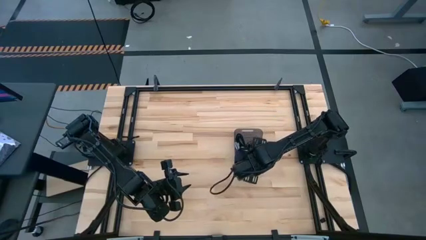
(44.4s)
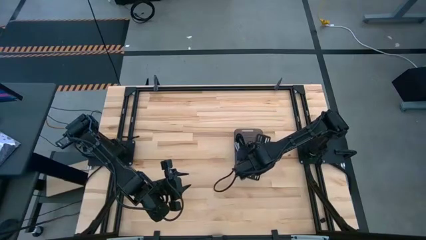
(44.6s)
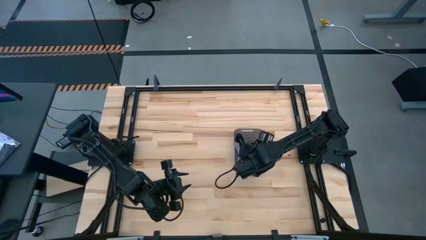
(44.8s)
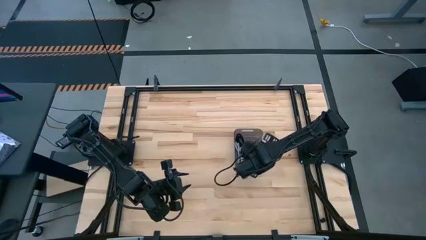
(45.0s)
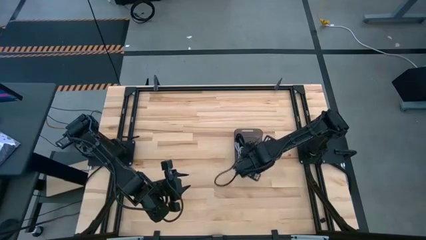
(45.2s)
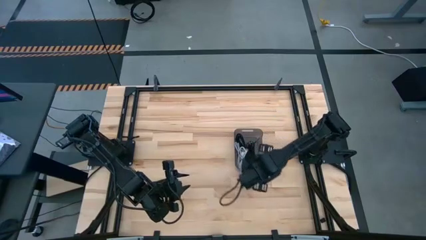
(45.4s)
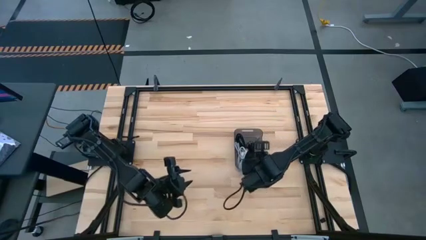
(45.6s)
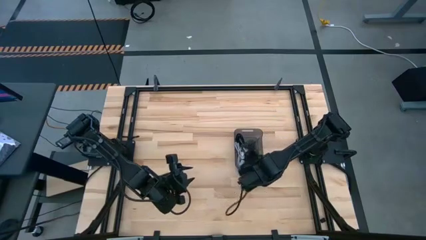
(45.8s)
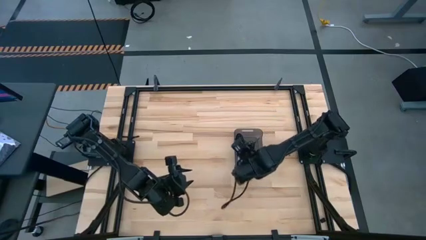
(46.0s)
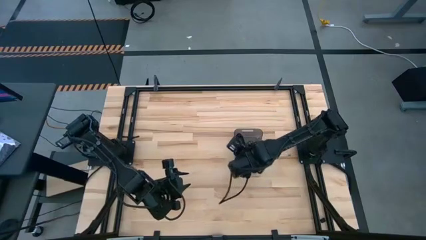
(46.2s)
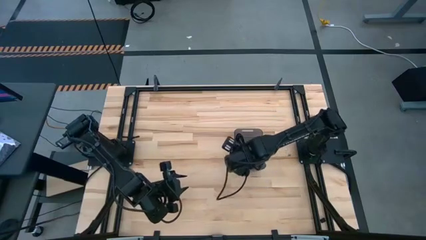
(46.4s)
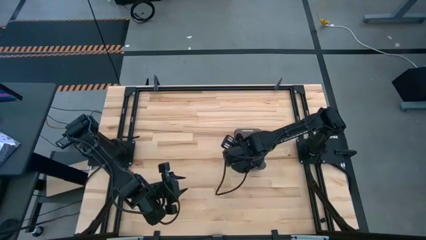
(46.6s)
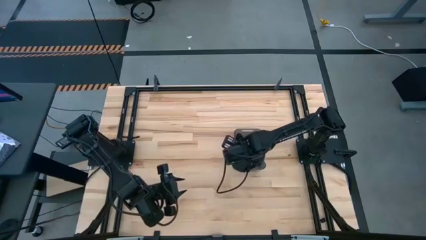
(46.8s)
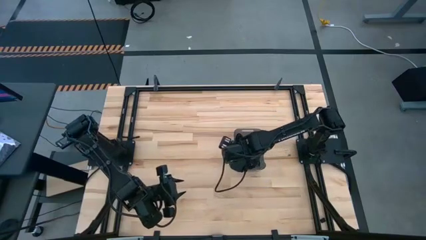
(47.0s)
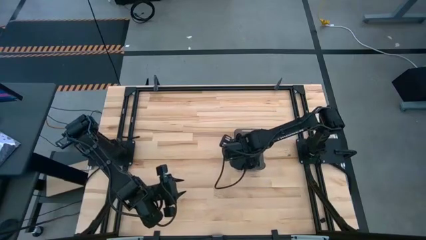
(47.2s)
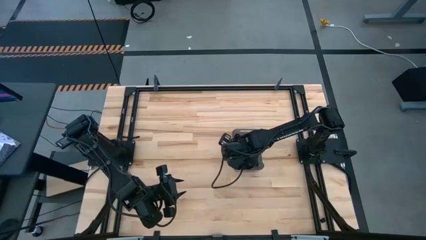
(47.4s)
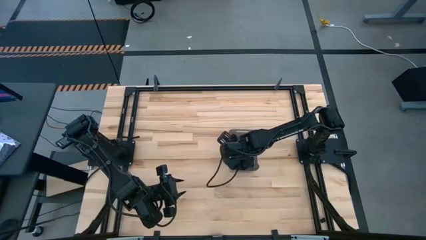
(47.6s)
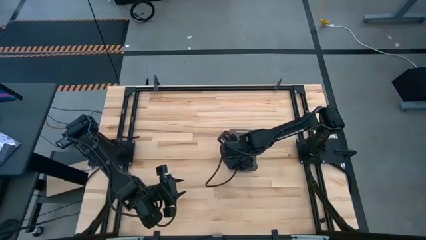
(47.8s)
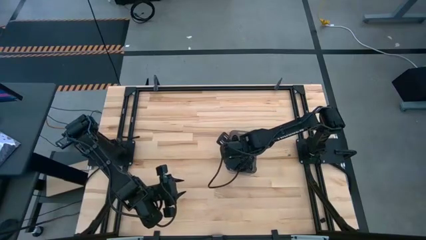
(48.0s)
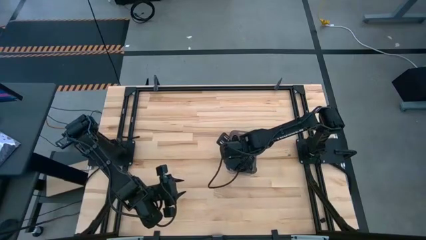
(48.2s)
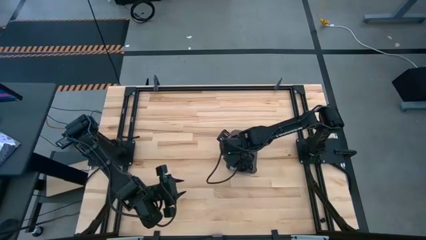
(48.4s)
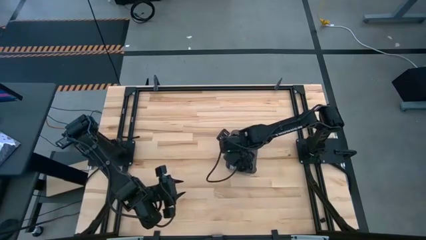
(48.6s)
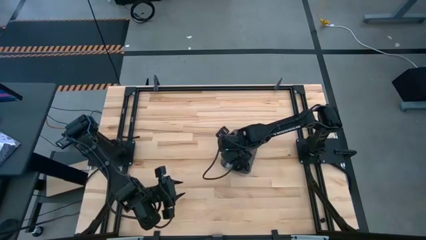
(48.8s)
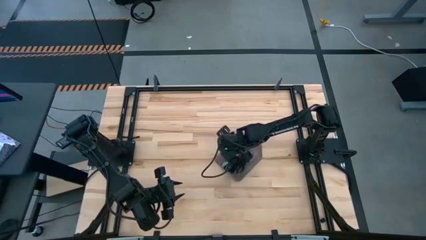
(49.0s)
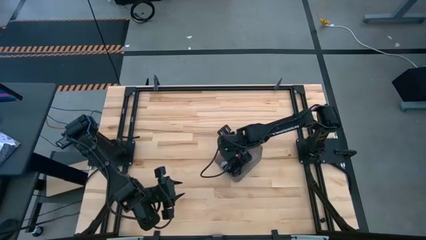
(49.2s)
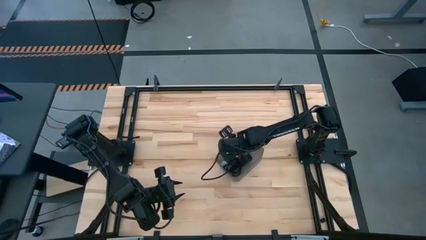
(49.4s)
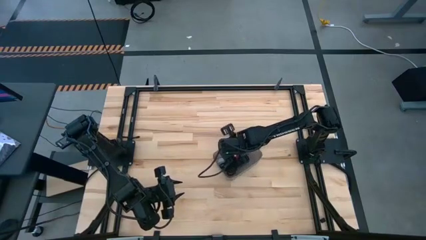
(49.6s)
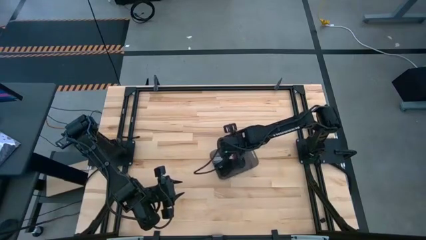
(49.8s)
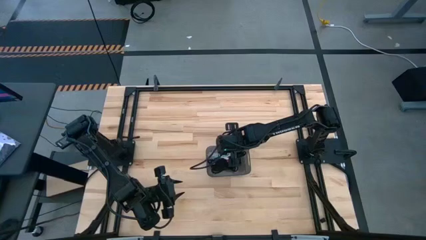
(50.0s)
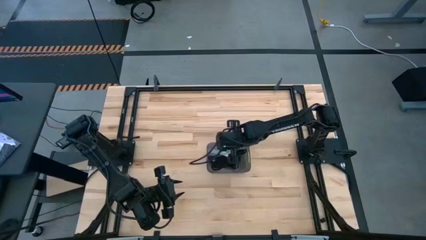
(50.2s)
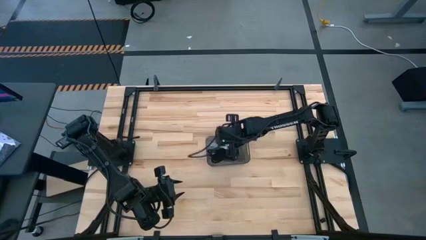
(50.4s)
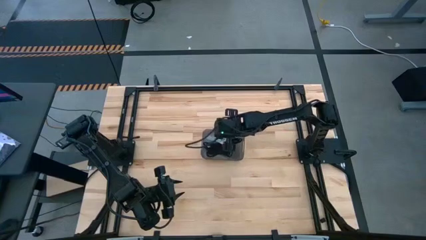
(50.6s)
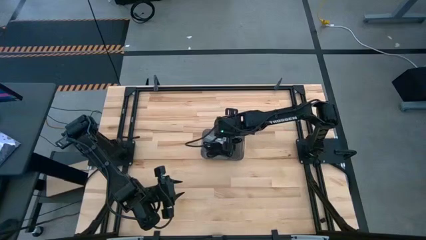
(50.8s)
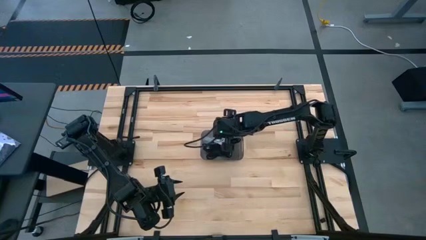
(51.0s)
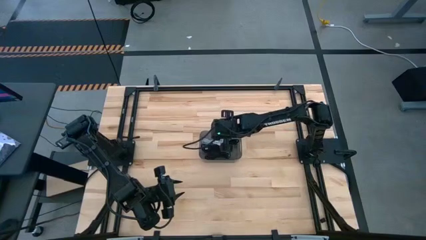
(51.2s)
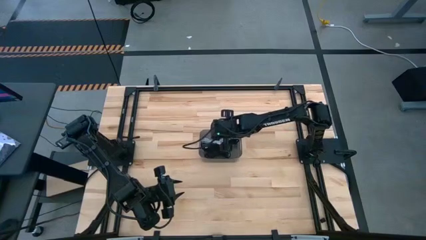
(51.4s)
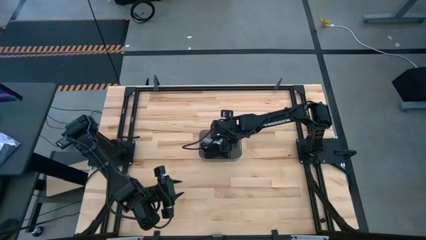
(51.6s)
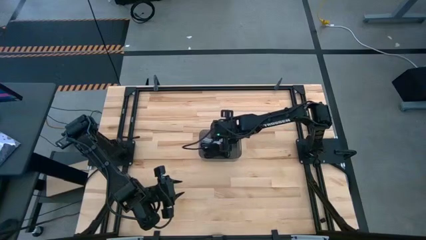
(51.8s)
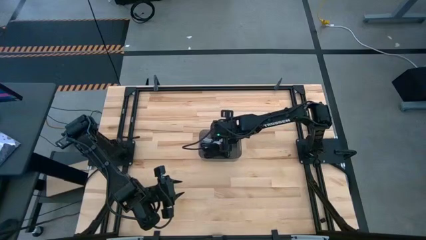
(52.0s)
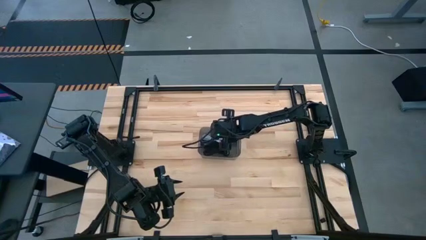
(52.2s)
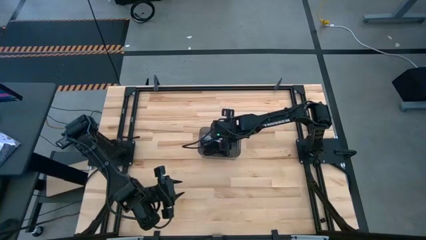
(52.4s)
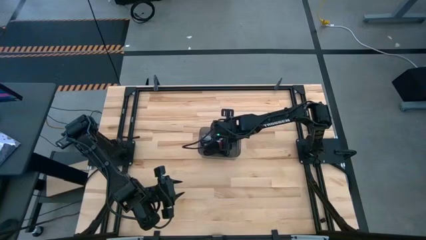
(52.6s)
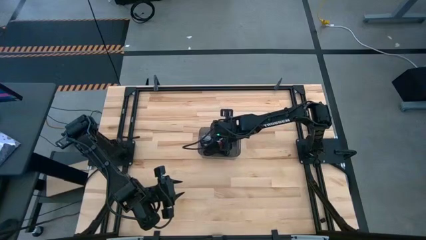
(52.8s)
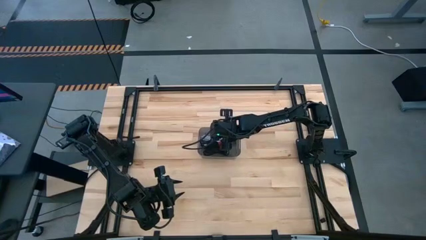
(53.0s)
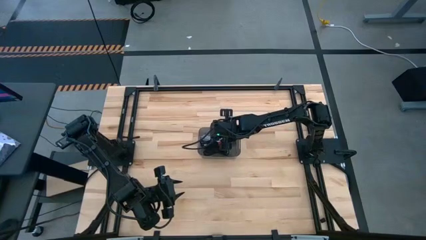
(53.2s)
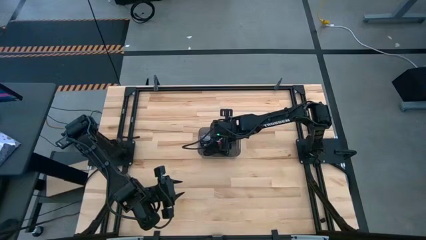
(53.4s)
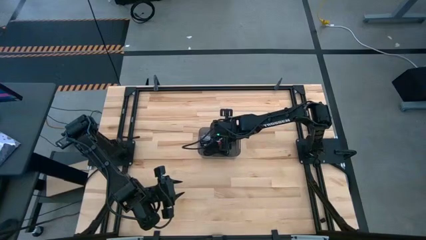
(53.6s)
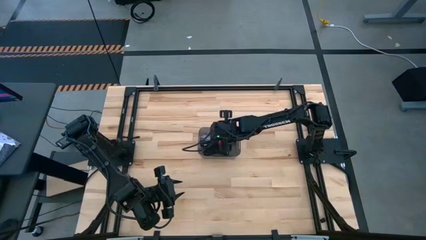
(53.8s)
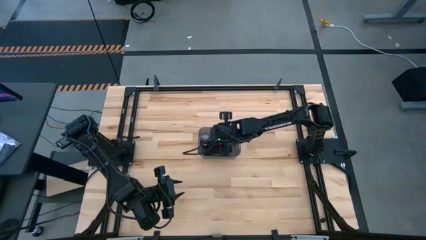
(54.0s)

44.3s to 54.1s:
Task: Pick and place USB-C Cables
Adjust the black bin on the table

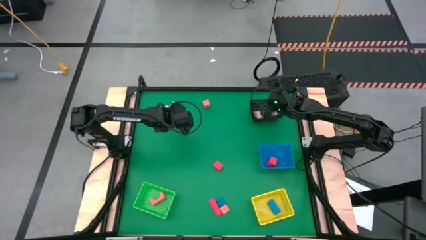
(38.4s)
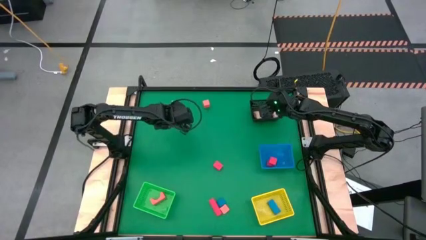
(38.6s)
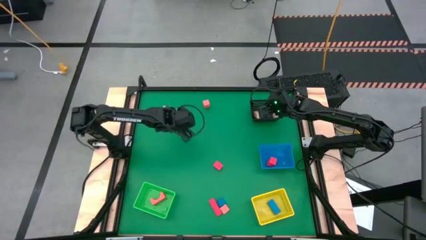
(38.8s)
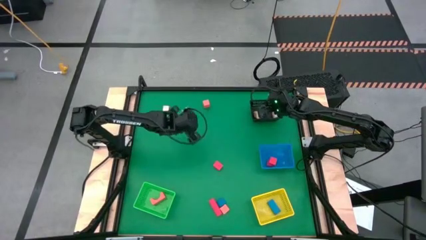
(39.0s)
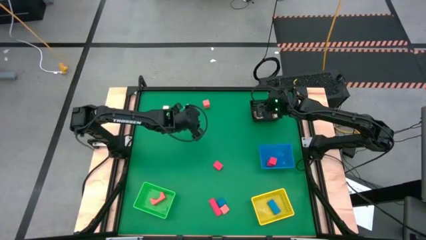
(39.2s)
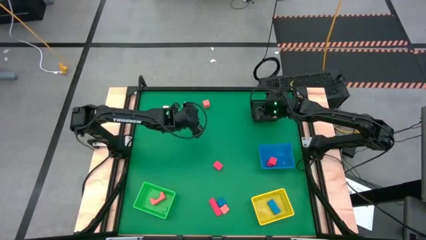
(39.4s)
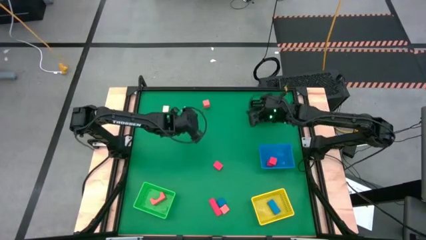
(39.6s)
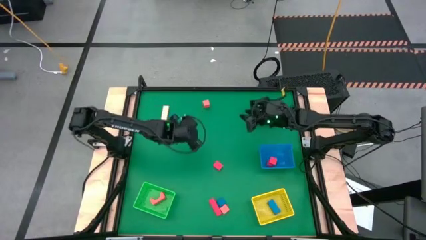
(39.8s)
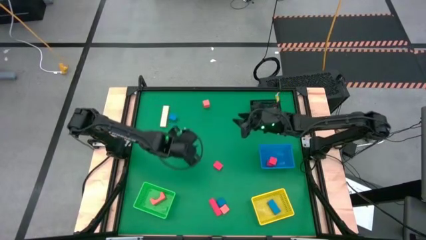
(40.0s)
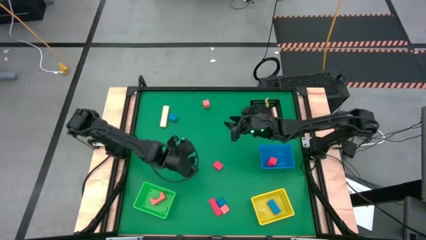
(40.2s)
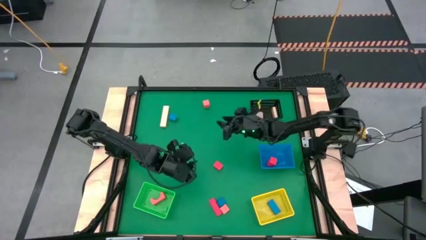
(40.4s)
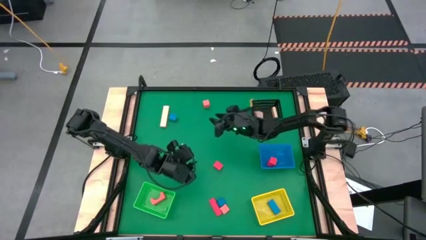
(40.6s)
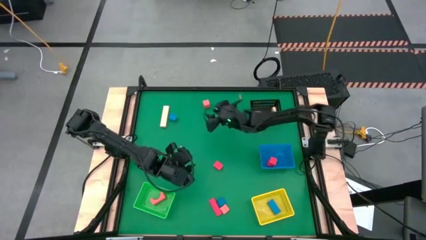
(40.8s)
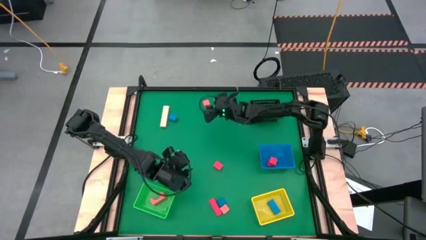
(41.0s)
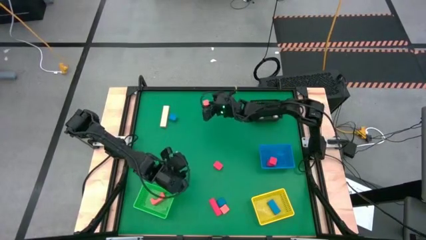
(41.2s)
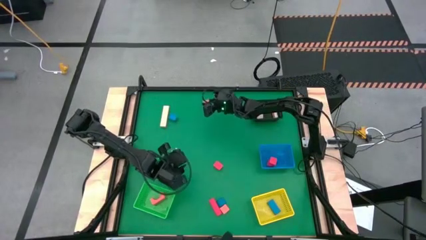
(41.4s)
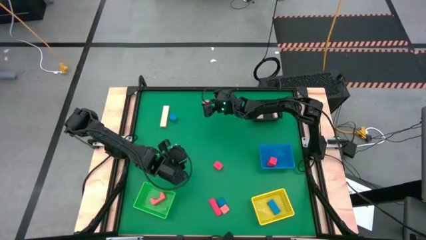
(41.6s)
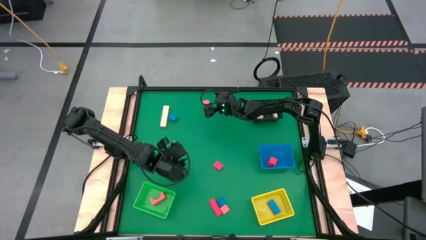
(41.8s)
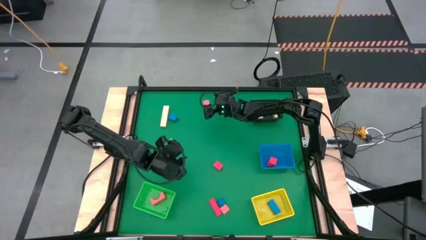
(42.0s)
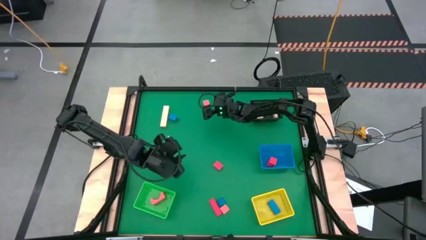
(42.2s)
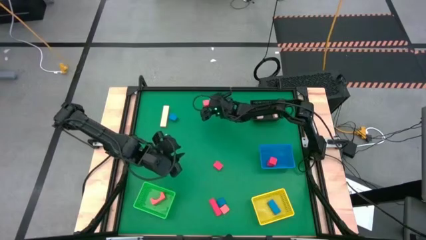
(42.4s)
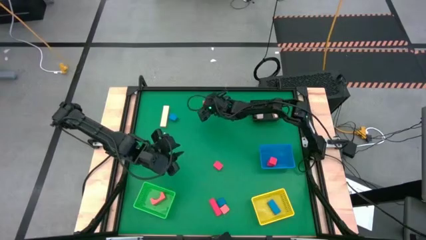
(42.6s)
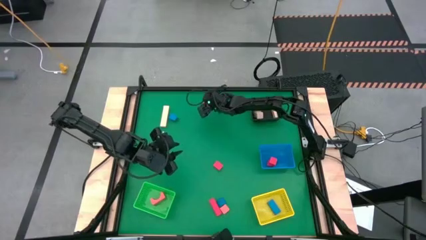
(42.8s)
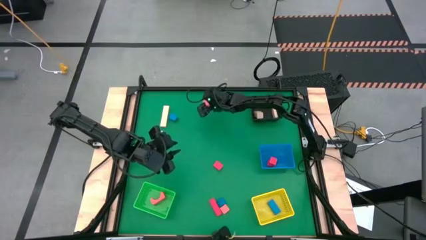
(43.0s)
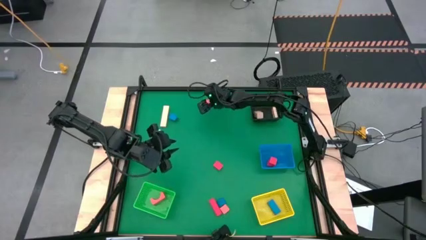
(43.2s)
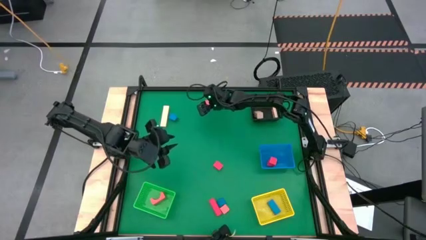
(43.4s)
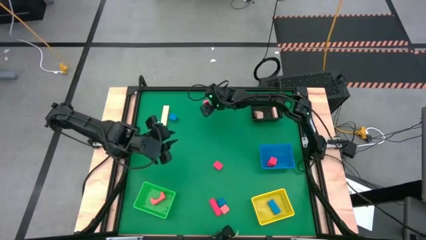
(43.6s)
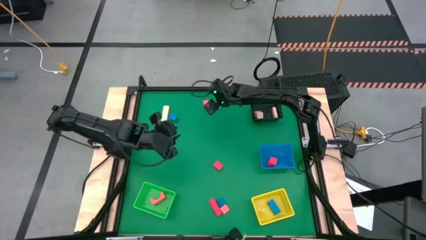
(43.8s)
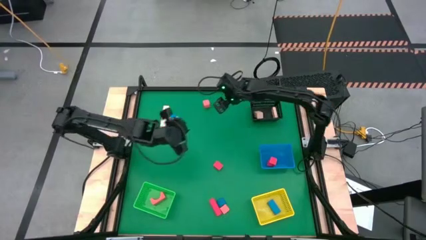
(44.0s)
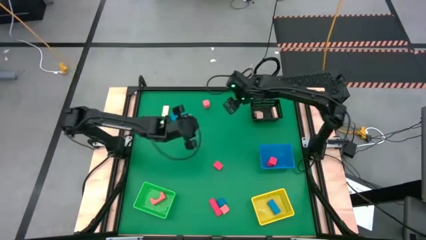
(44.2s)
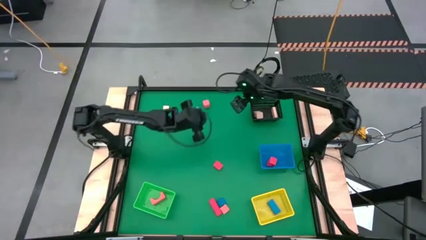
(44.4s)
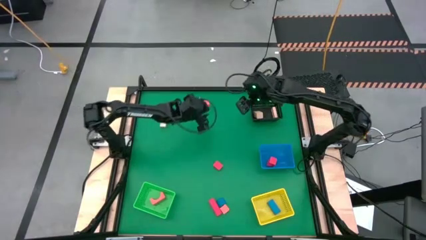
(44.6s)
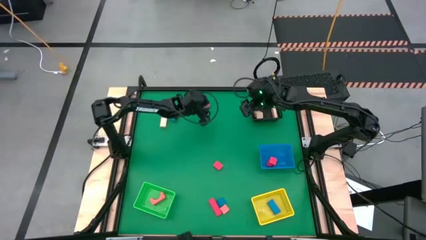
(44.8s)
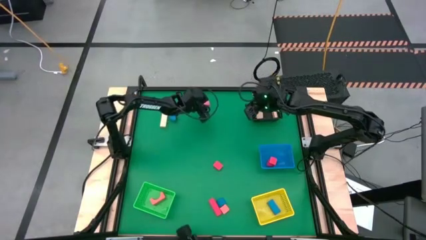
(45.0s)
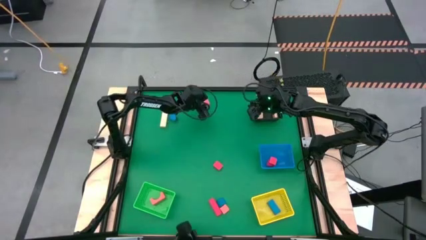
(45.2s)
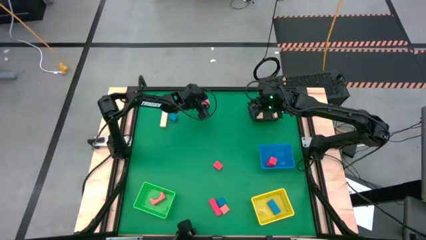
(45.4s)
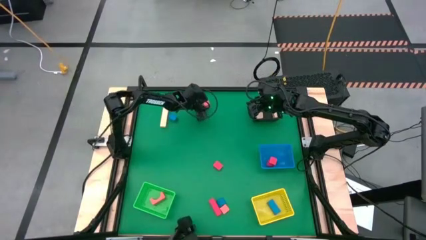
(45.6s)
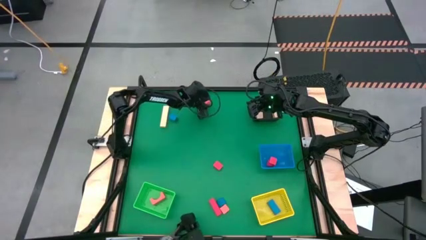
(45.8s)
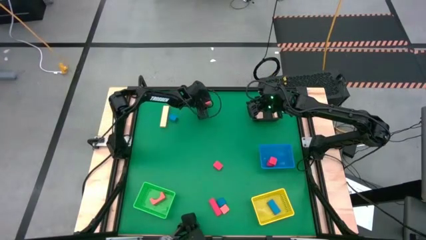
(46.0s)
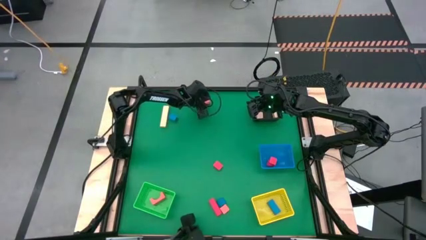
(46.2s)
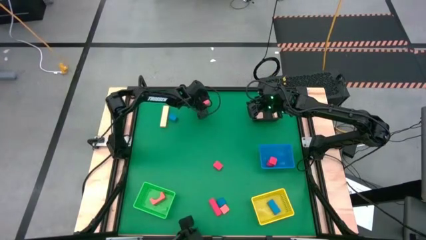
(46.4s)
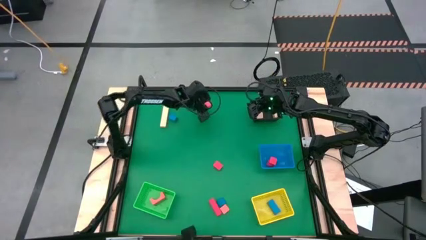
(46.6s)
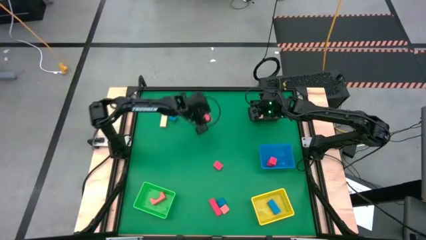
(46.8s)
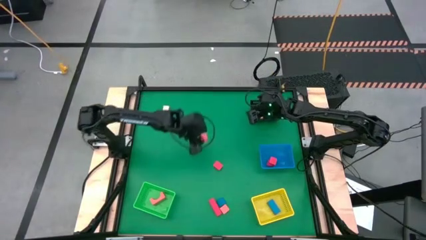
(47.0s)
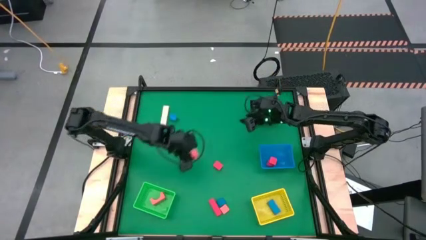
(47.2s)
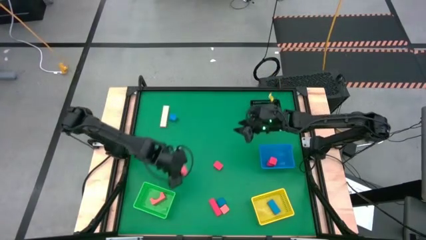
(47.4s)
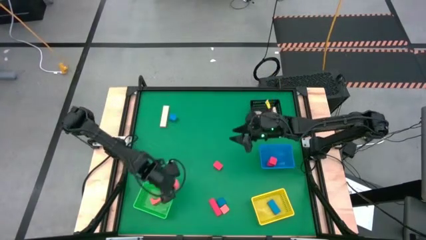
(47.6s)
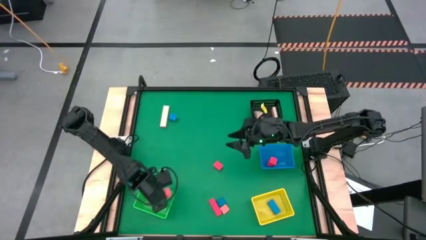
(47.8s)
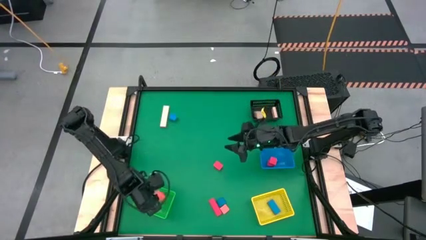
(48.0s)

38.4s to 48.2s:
Task: Sort & place blocks by color
Put the orange block into the green bin
